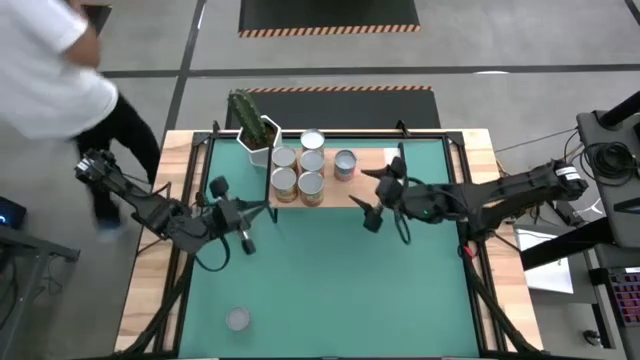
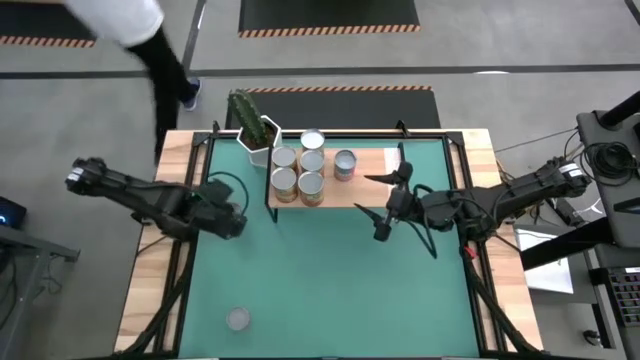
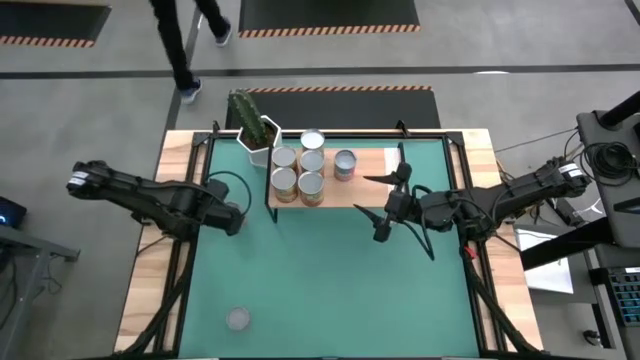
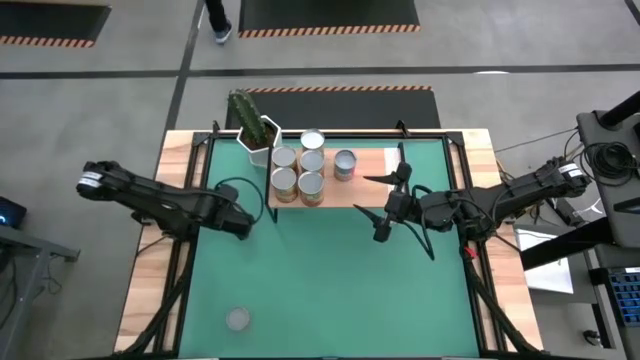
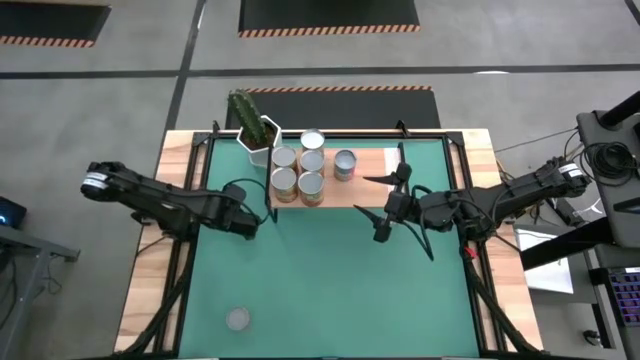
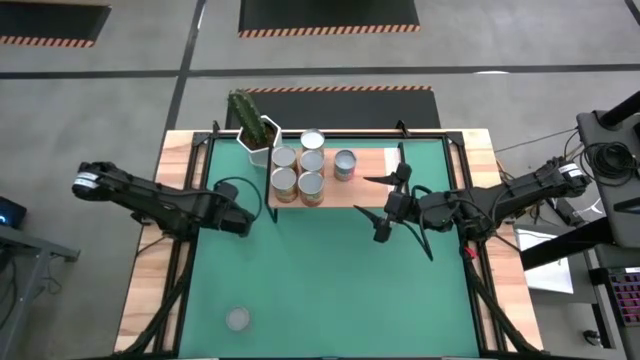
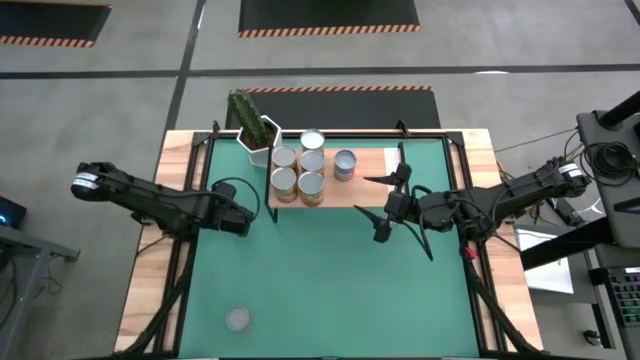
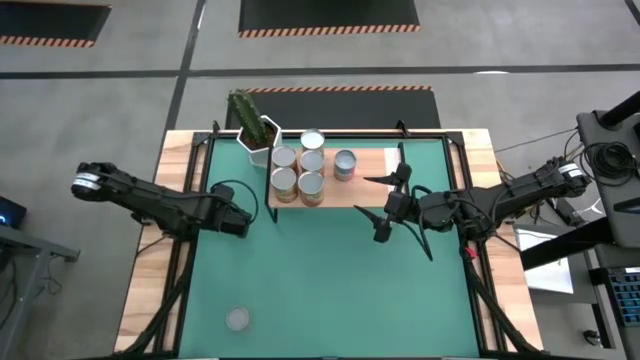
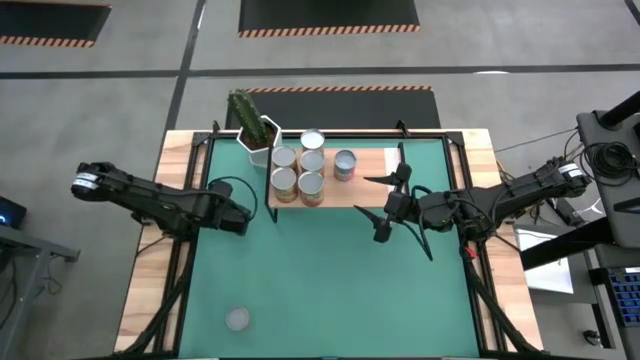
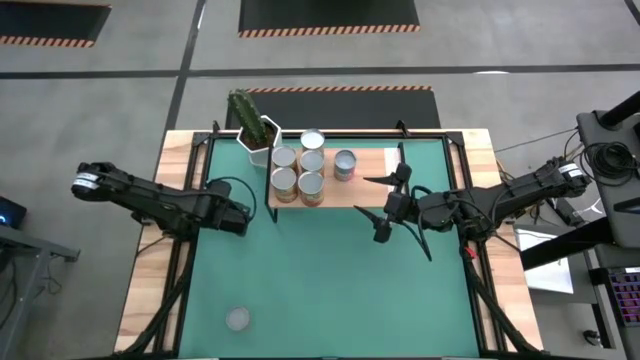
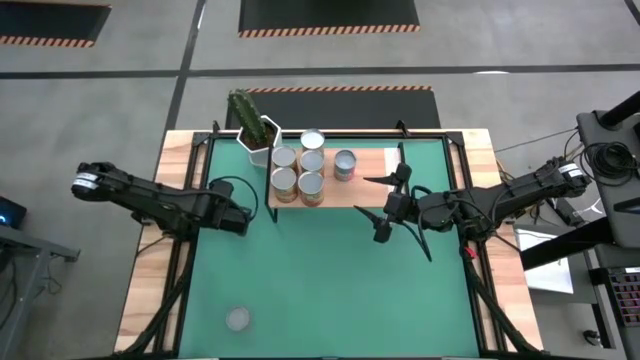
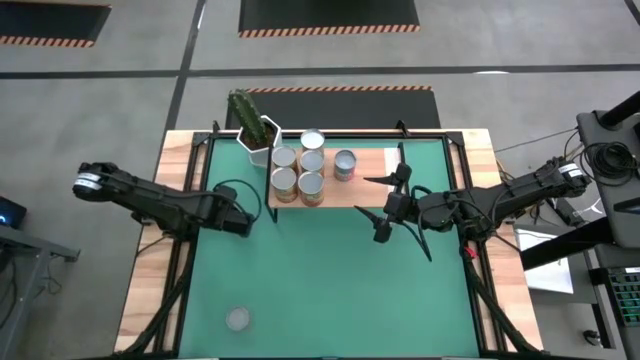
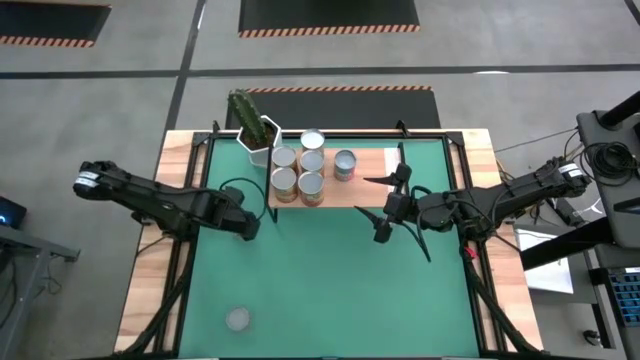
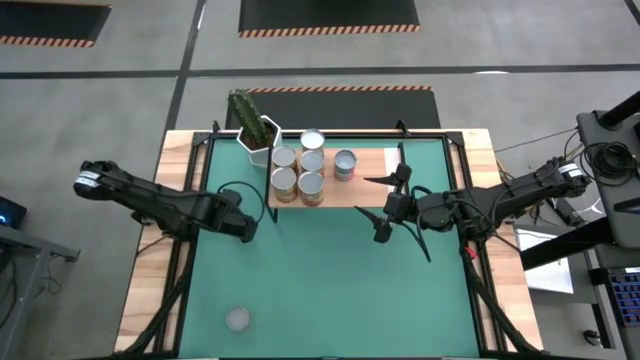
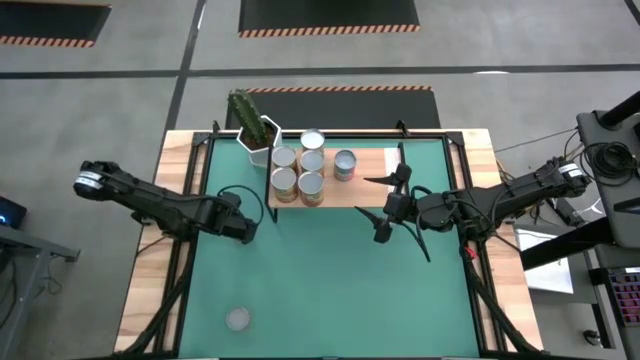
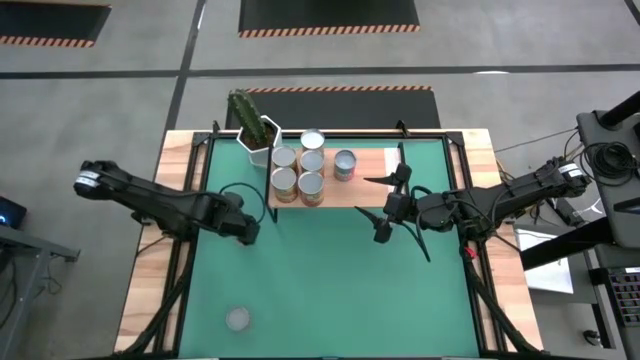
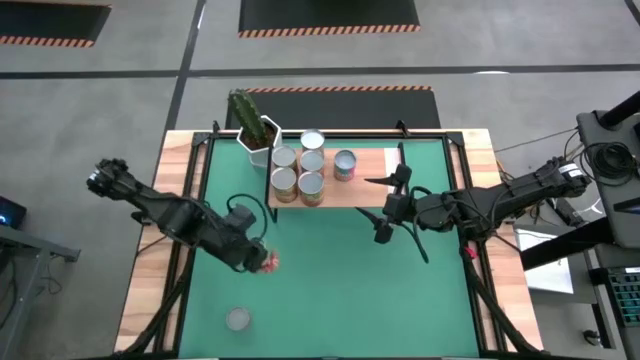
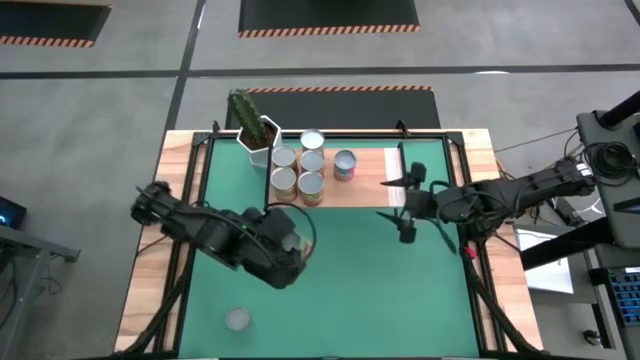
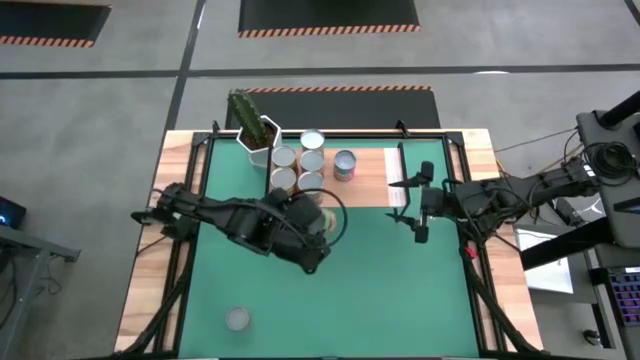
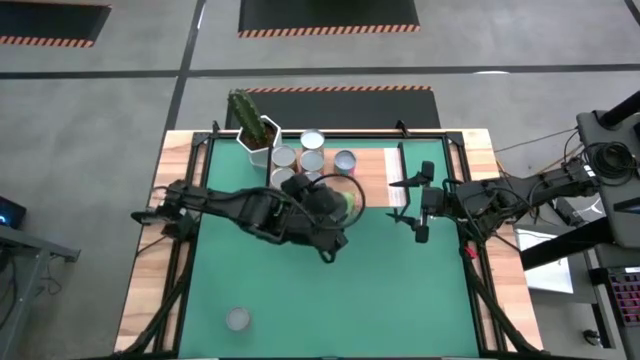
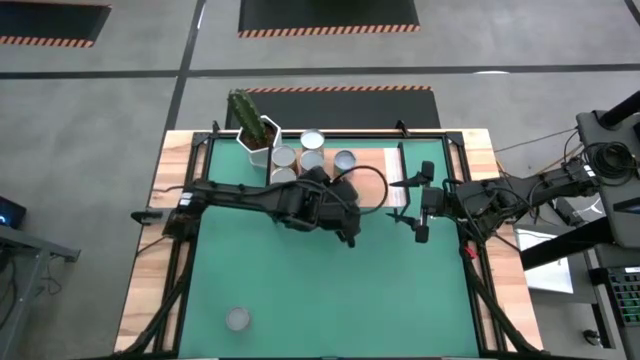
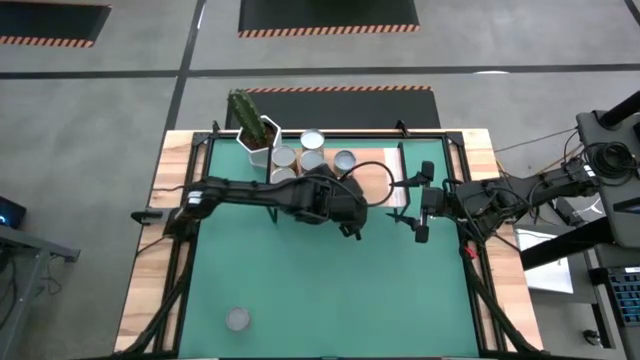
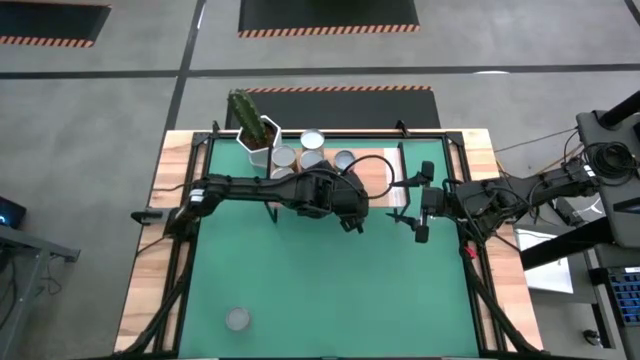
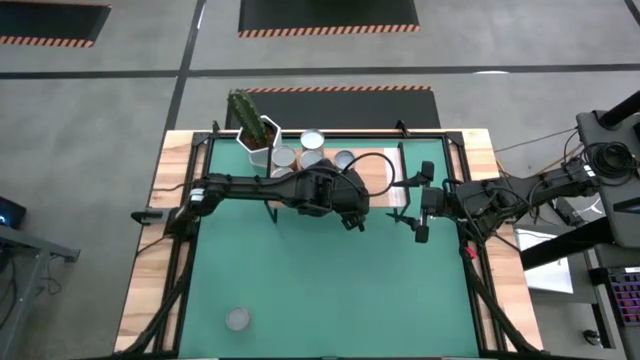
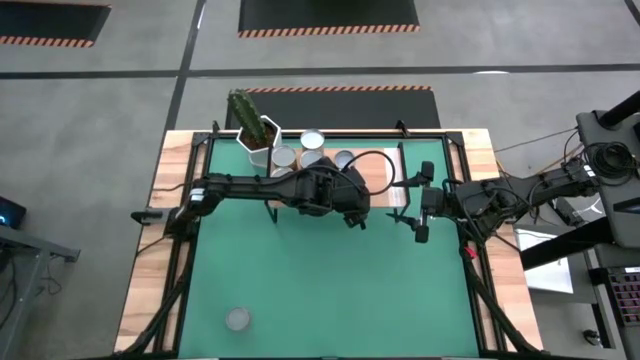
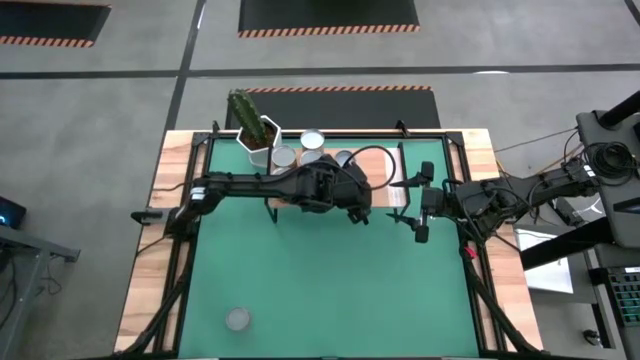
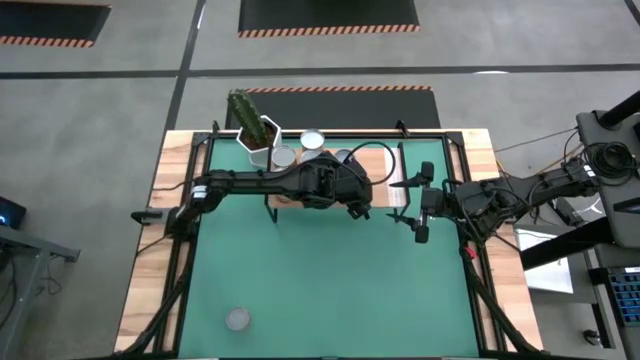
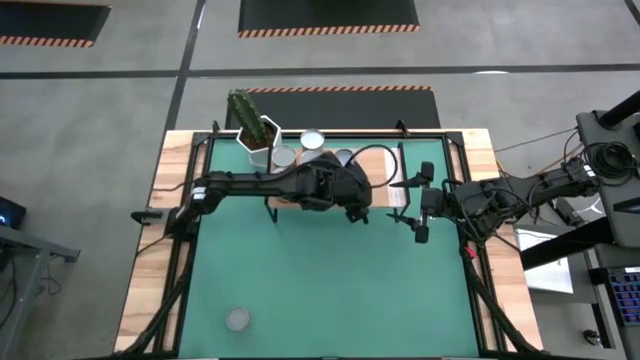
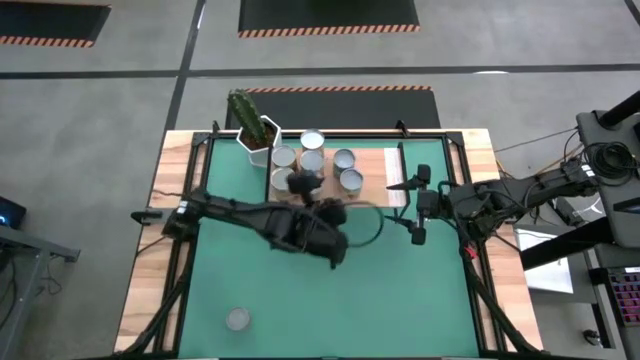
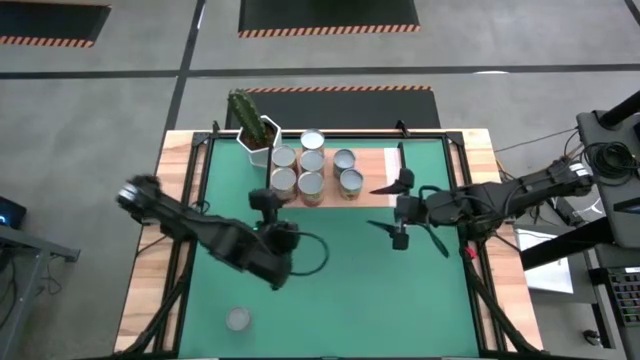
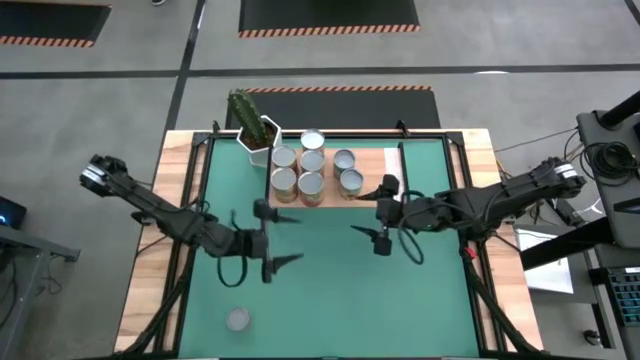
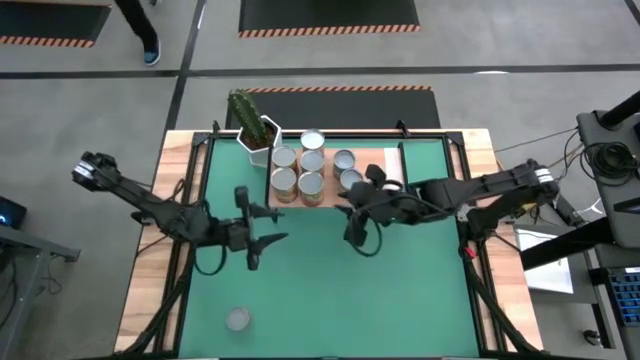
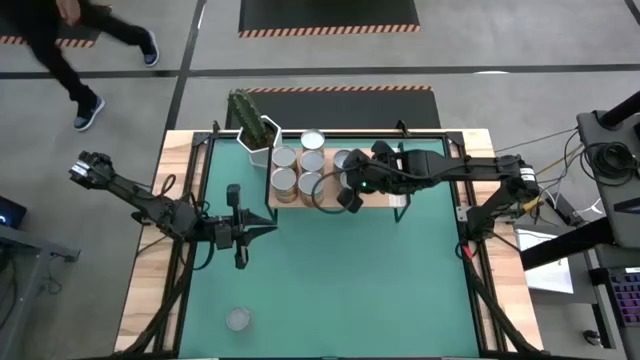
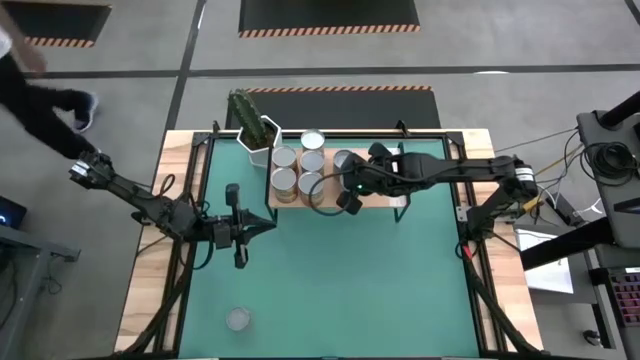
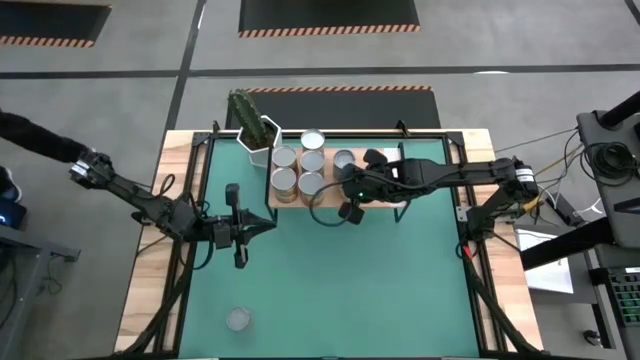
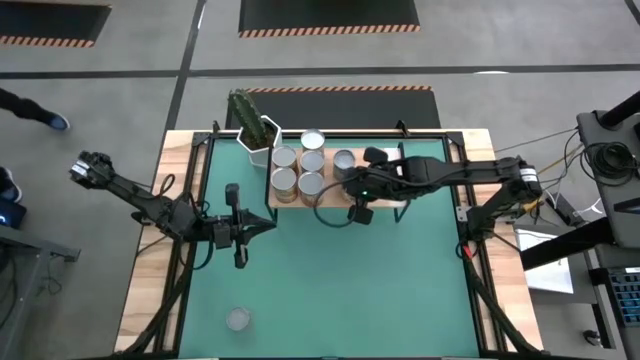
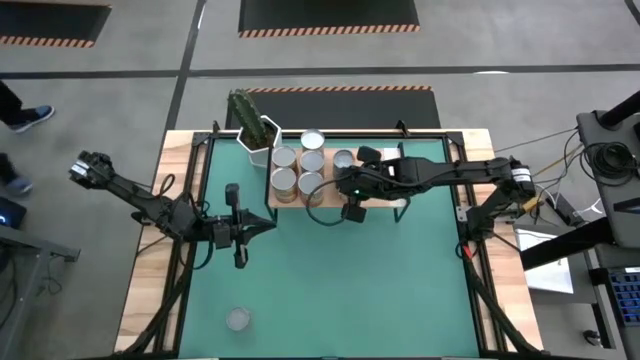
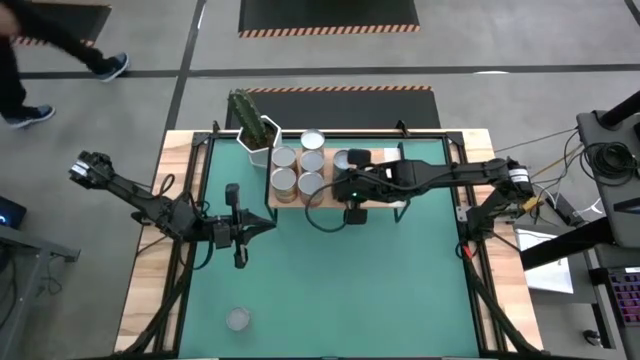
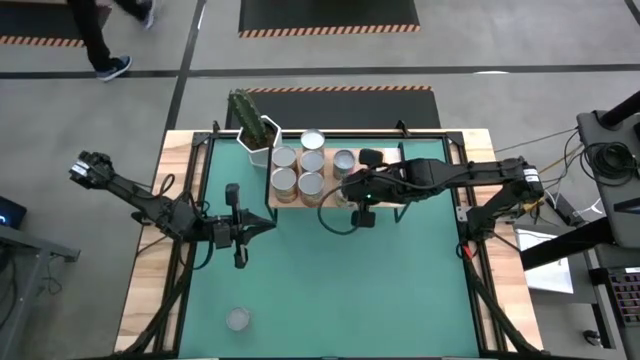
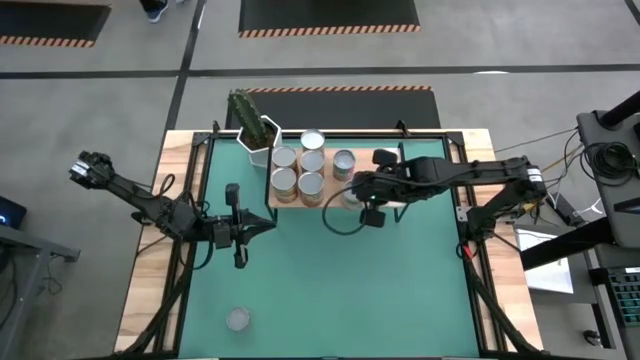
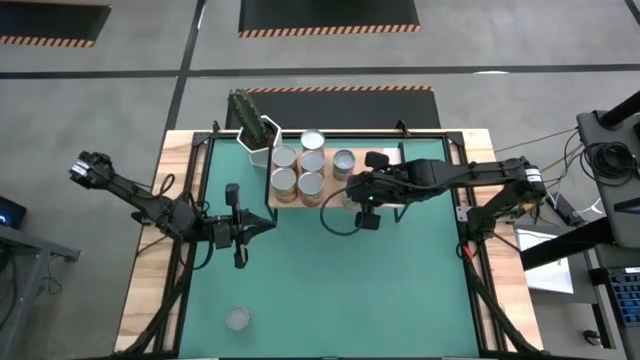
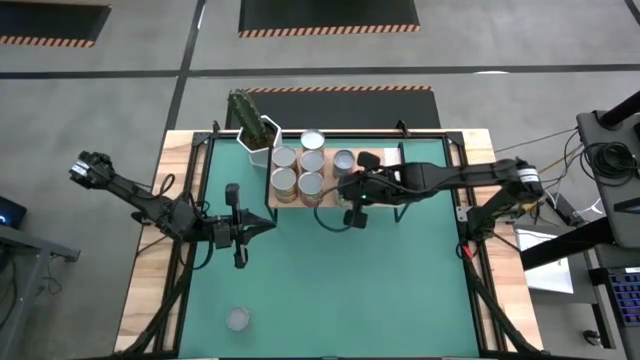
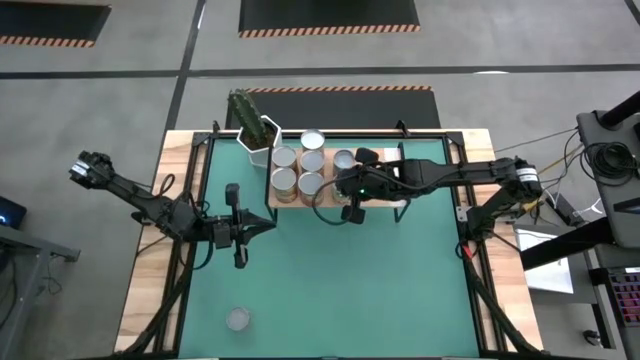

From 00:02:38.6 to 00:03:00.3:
Task: Pick and place cans onto a shelf
Put the canned spaghetti sauce on the shelf
